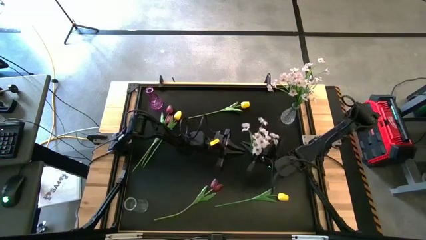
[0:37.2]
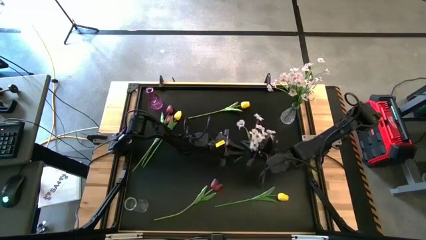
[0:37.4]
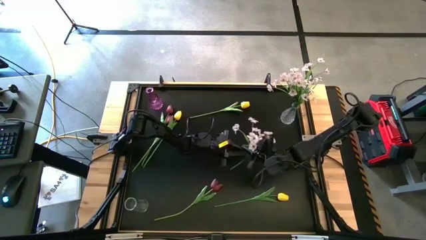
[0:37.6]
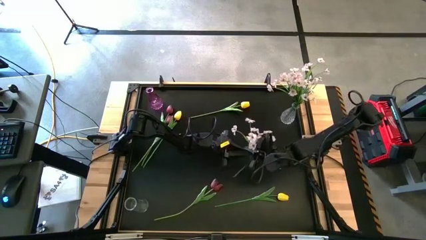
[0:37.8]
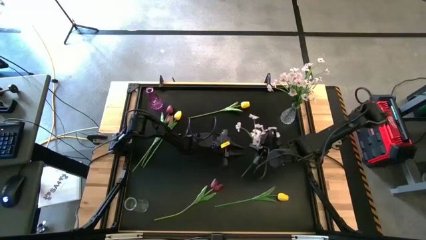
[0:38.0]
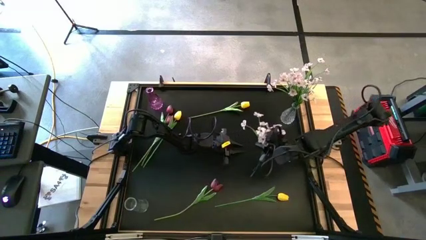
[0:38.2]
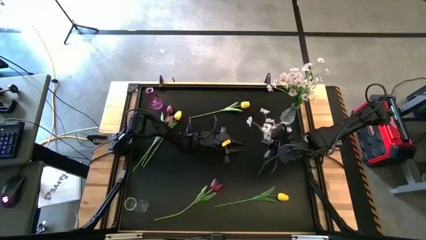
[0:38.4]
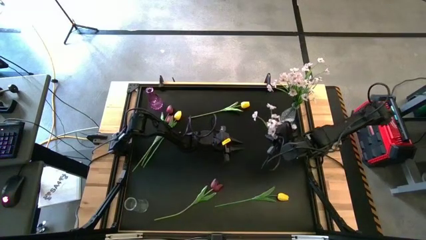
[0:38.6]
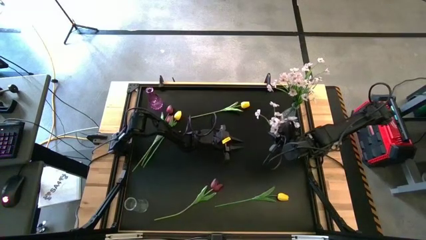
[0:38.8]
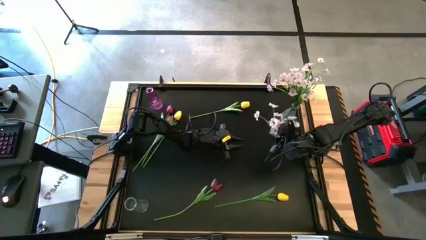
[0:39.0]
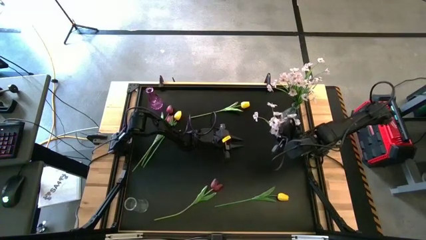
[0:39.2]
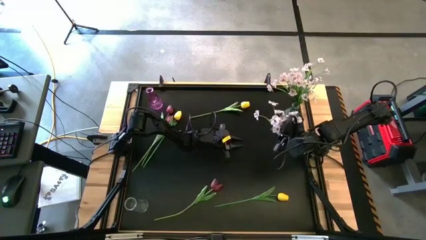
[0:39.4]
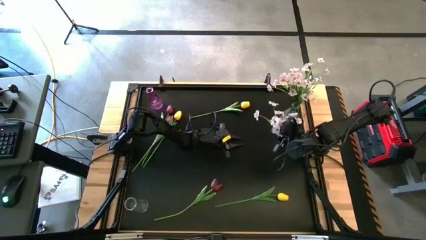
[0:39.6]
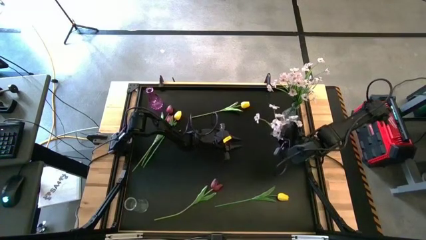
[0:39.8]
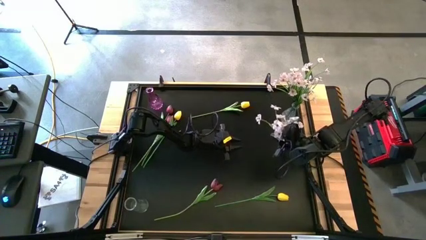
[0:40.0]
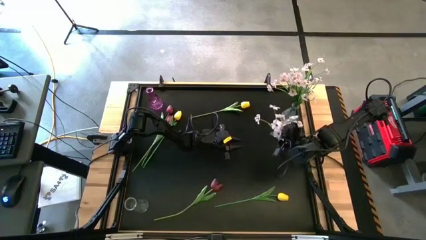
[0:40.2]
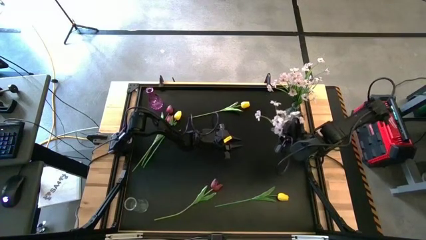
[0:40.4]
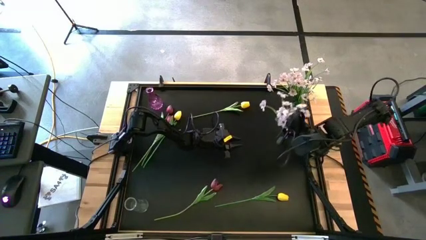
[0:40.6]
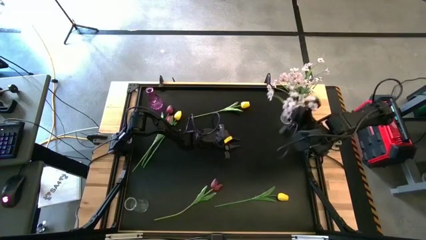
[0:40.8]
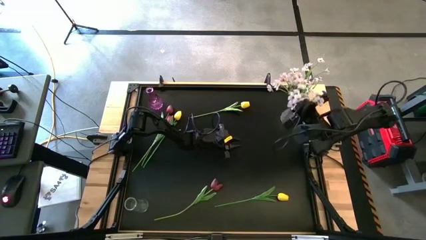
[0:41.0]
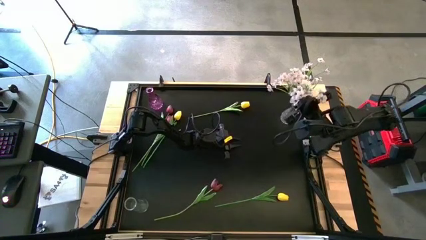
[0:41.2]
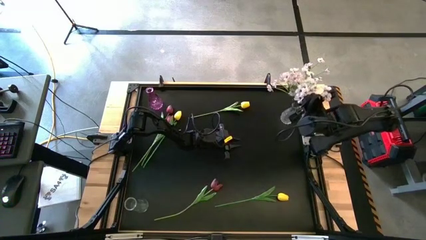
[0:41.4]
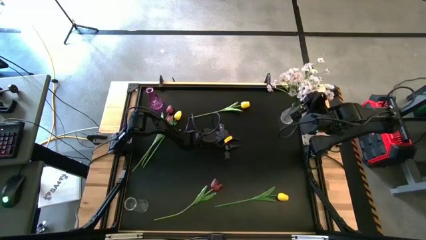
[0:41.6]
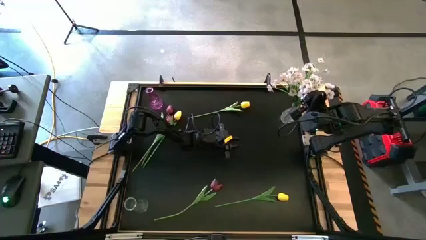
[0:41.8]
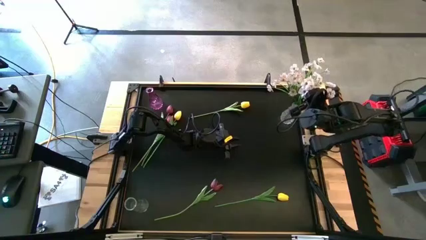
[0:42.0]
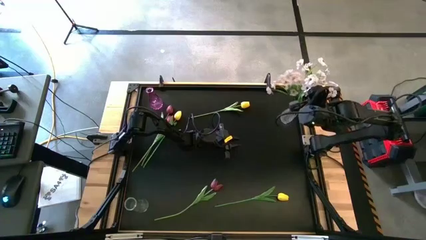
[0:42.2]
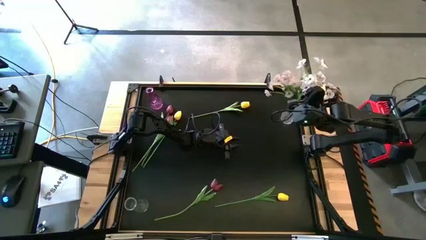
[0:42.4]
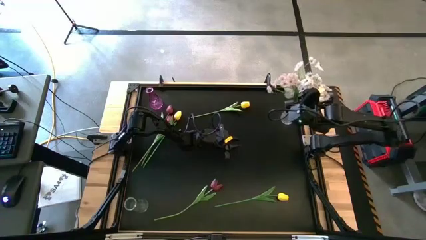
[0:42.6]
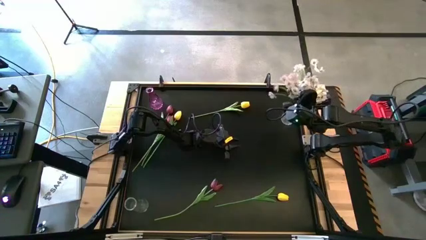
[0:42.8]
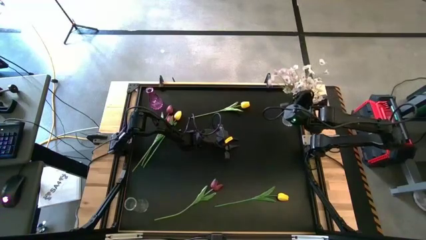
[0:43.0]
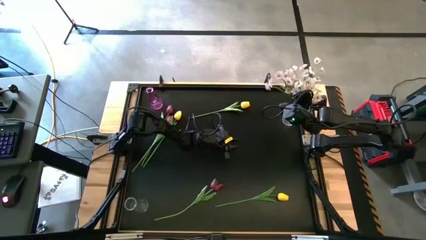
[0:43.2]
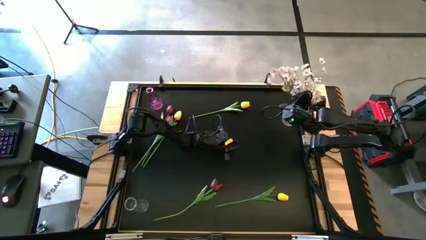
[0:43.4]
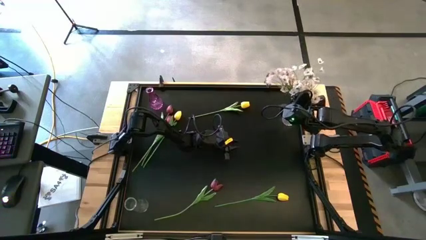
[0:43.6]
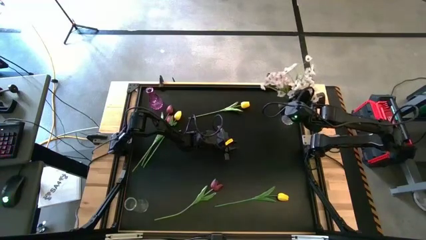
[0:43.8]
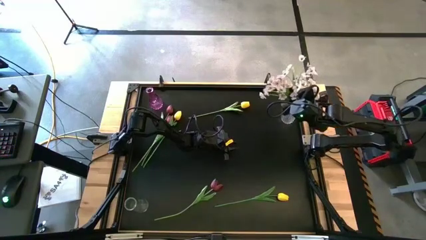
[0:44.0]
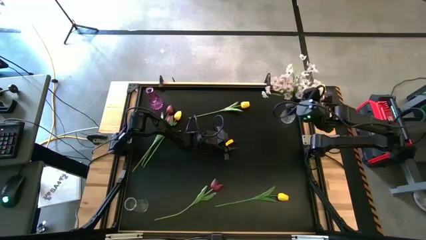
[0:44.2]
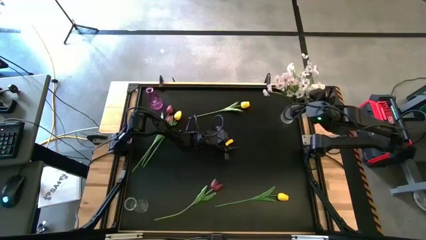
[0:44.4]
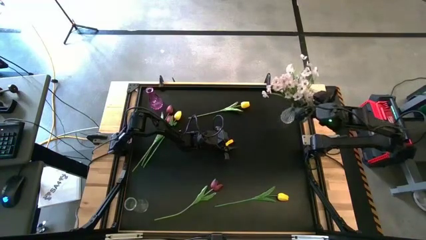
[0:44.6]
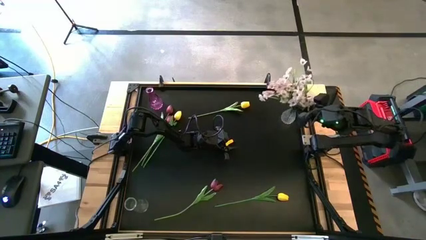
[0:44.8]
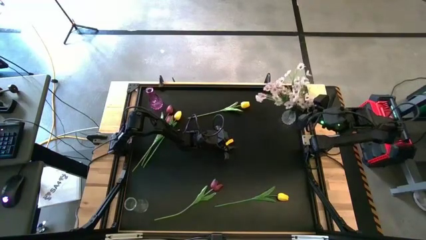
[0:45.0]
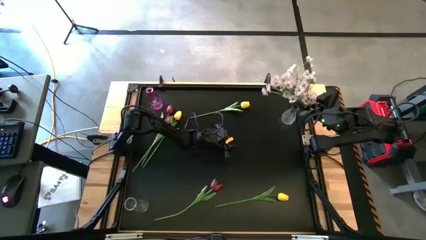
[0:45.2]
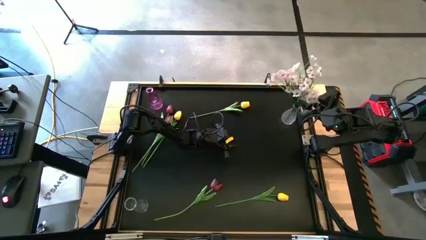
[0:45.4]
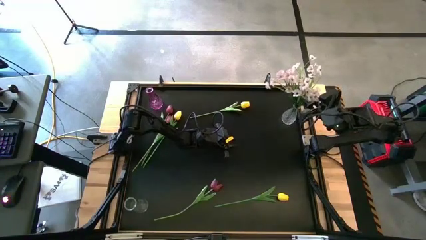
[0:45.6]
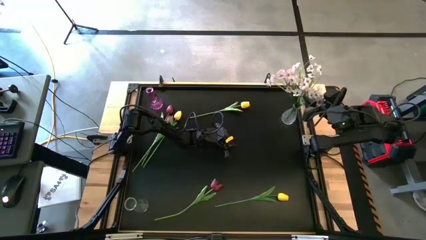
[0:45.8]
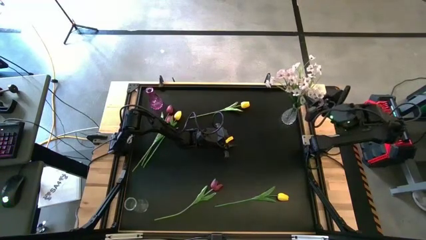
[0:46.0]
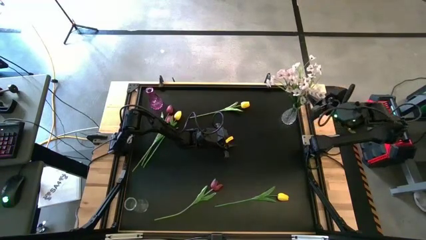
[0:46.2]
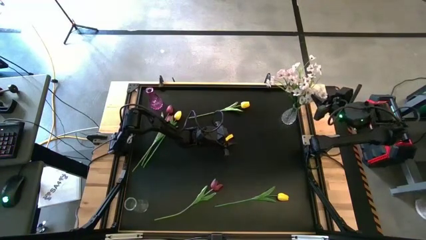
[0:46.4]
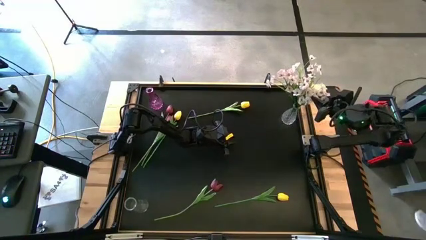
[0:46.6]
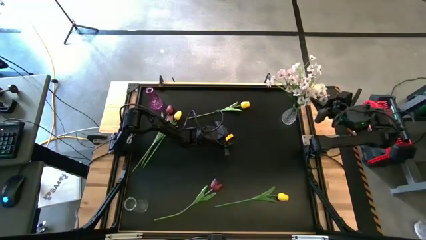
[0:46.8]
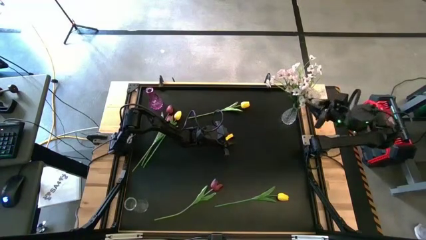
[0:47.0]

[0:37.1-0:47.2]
Task: Sort flowers into vase by color
Put the white flowers into the top transparent vase

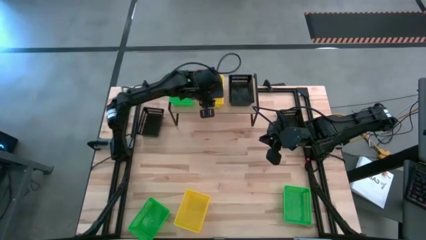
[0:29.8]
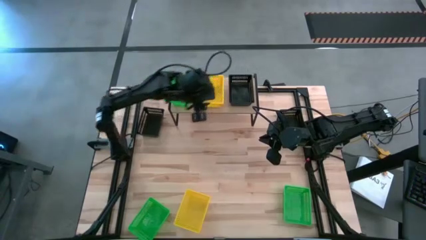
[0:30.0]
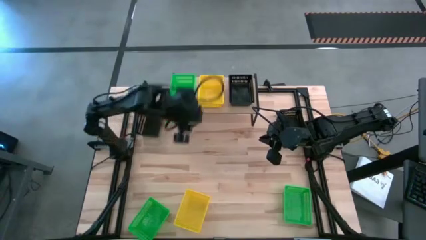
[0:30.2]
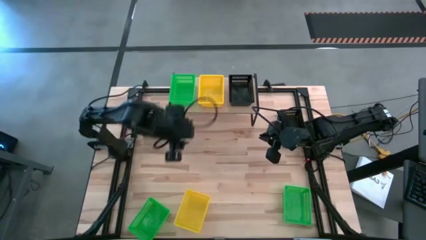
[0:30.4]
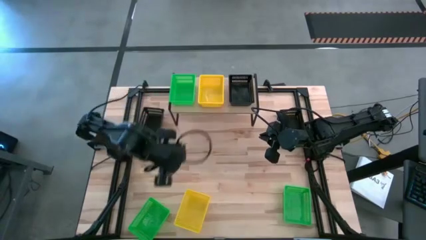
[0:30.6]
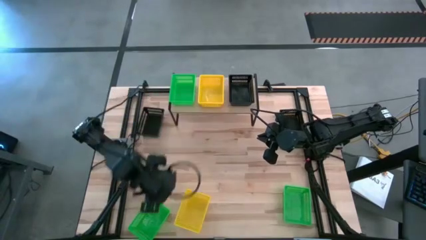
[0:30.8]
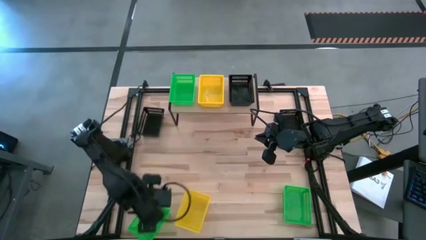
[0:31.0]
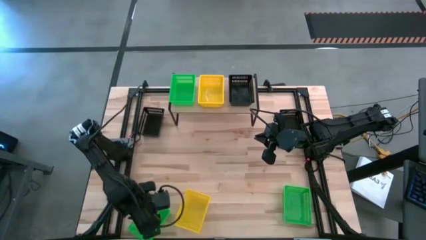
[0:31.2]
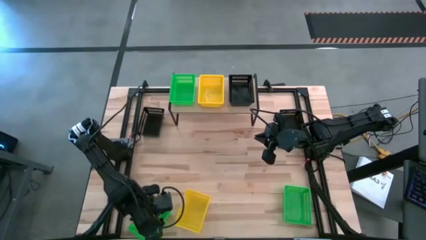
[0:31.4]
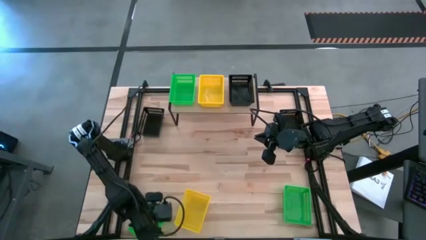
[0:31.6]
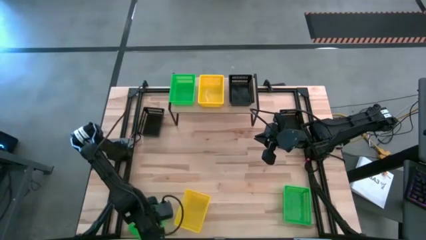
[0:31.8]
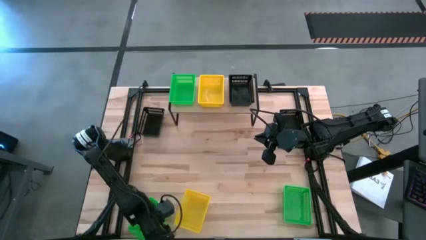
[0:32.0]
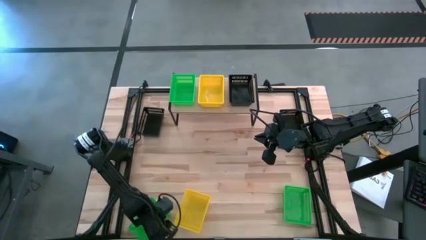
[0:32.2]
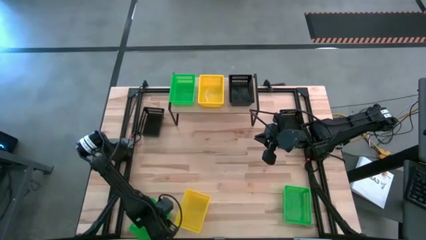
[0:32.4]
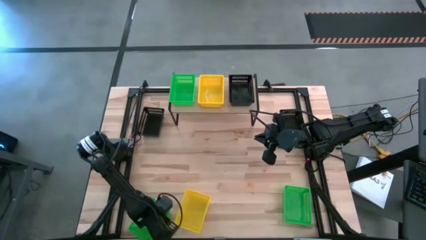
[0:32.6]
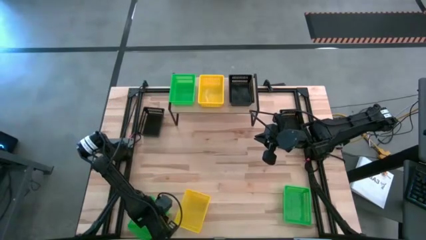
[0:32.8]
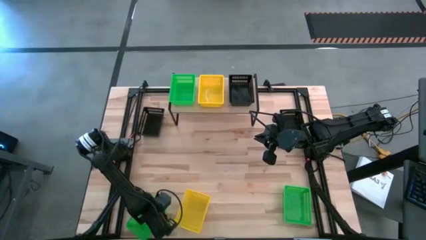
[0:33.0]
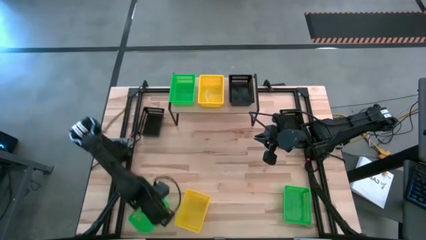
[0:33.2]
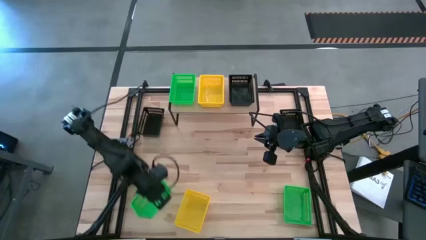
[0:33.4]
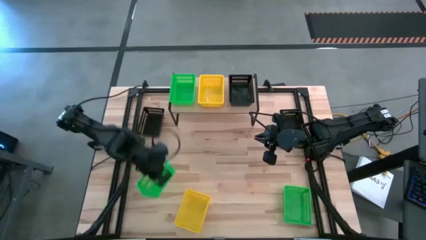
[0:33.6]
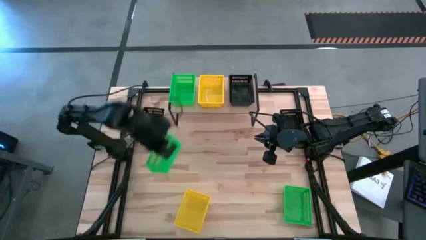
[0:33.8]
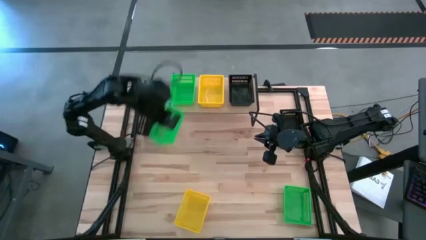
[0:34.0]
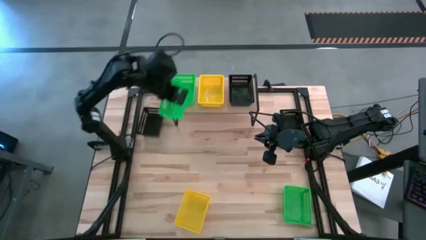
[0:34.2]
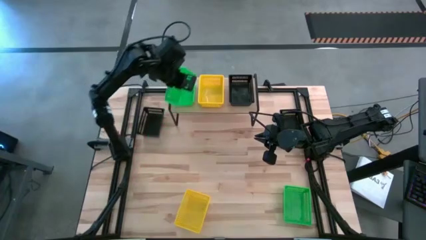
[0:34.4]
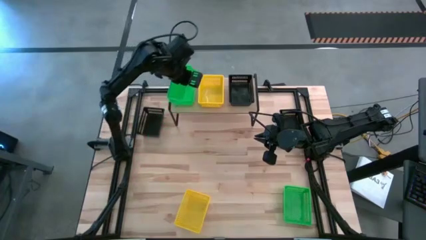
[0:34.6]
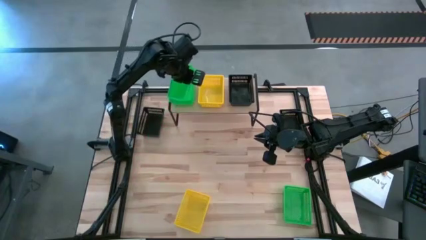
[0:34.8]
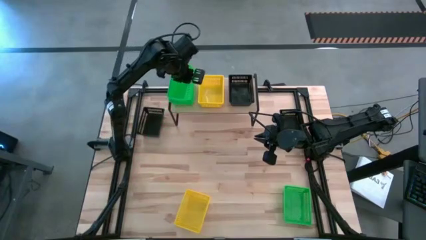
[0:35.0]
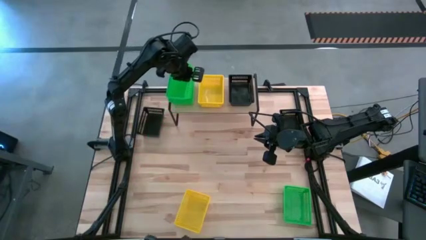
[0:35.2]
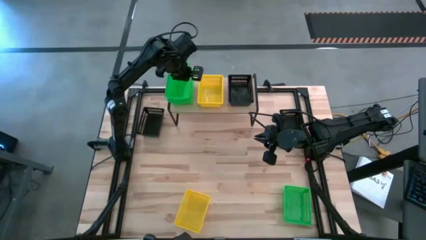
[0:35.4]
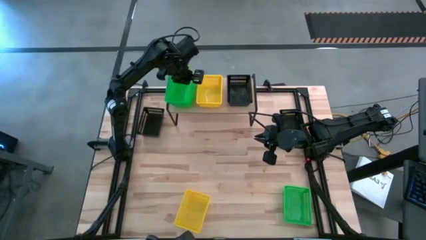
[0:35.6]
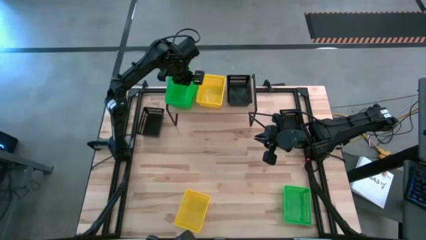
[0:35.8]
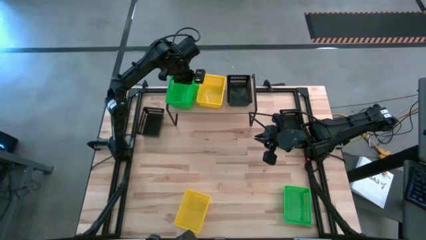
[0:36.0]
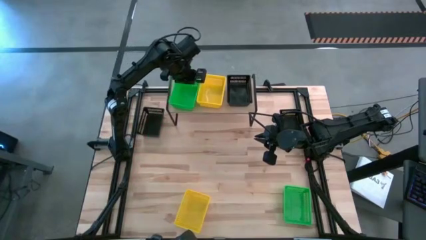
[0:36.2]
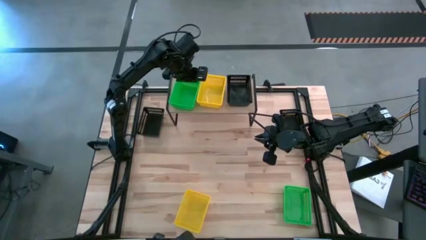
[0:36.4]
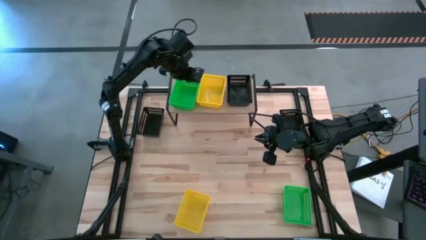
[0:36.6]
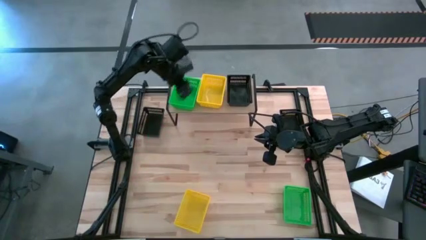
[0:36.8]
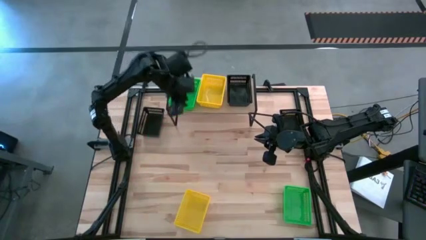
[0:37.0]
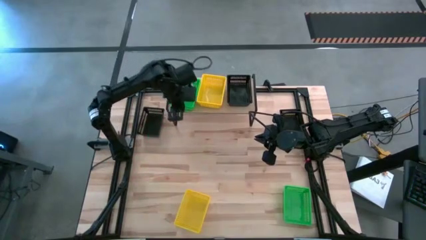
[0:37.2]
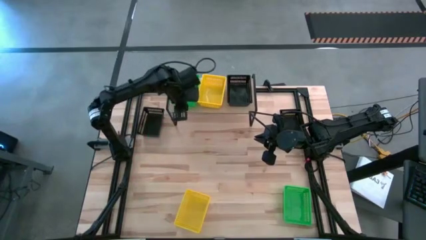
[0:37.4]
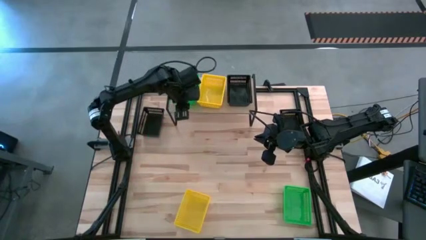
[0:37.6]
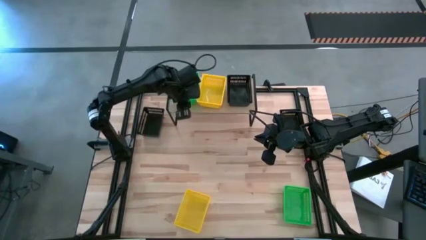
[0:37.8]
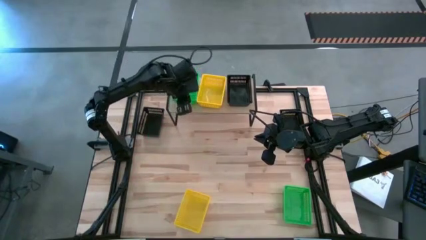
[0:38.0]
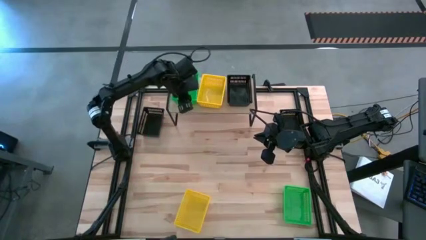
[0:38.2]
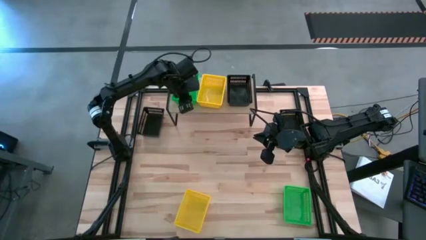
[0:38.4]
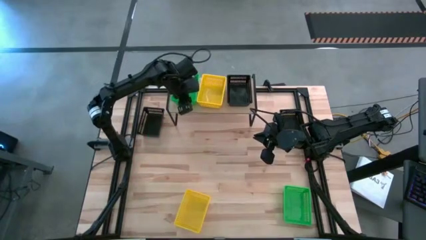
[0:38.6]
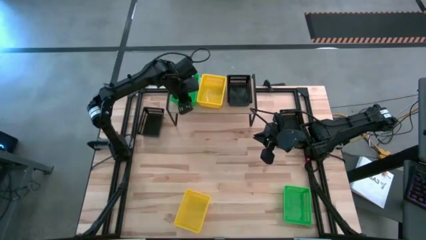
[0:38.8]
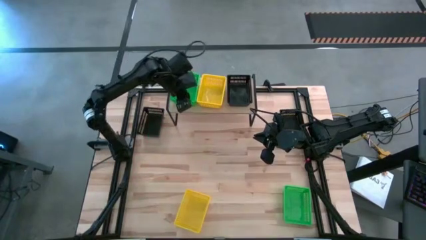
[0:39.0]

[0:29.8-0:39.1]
Task: Stack baskets on shelf by color
Stack the left green bin on the green bin on the shelf
